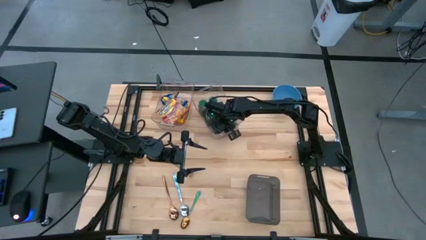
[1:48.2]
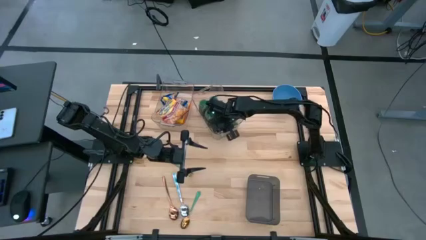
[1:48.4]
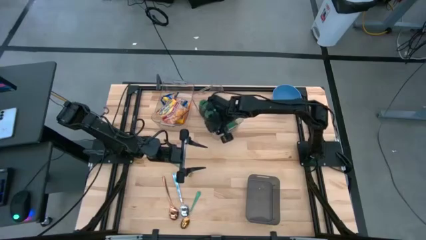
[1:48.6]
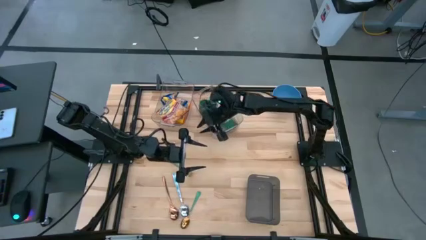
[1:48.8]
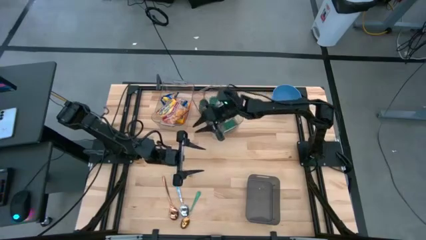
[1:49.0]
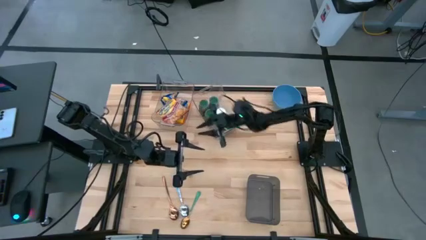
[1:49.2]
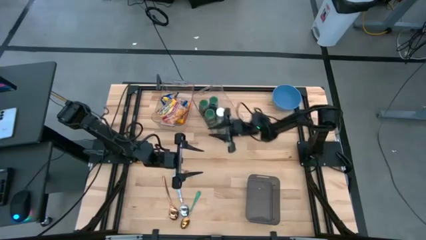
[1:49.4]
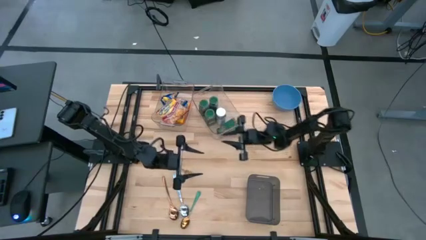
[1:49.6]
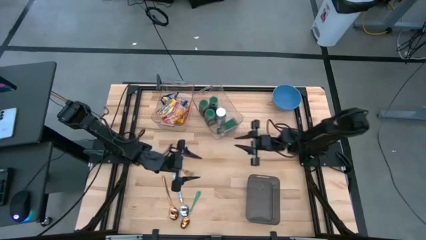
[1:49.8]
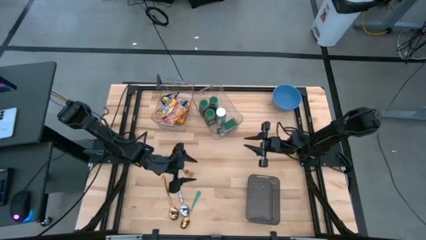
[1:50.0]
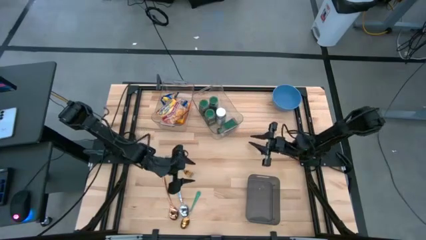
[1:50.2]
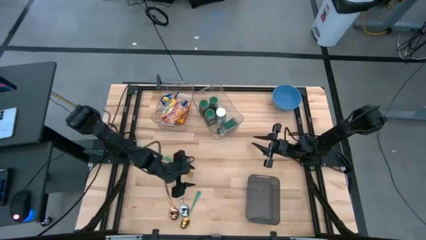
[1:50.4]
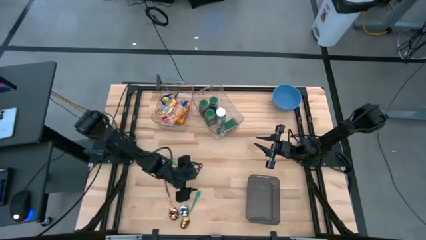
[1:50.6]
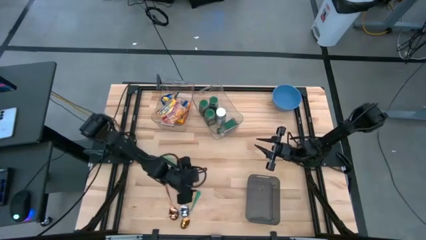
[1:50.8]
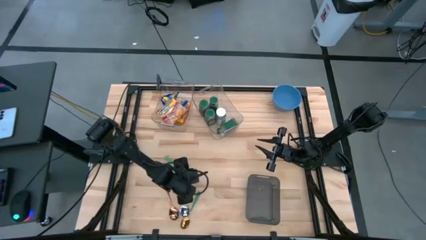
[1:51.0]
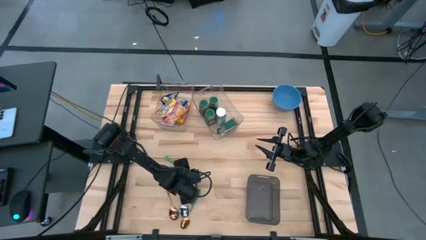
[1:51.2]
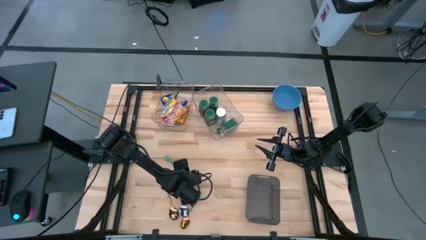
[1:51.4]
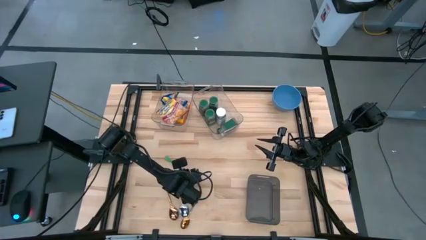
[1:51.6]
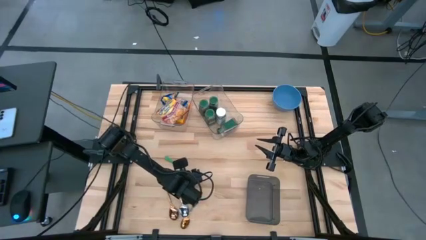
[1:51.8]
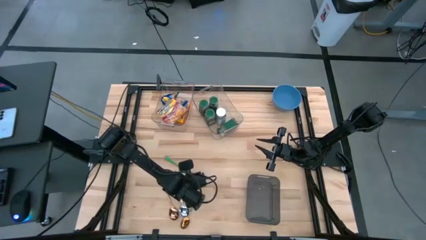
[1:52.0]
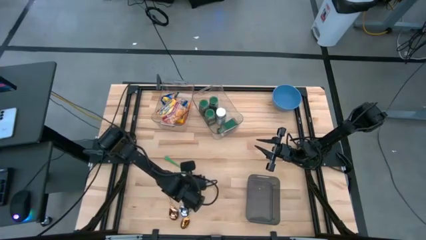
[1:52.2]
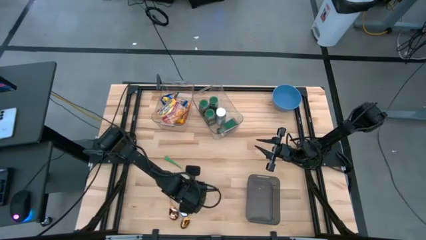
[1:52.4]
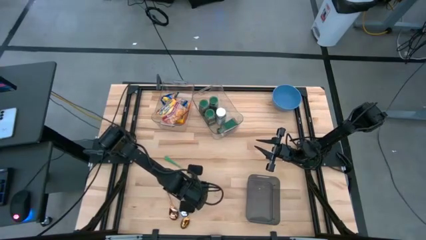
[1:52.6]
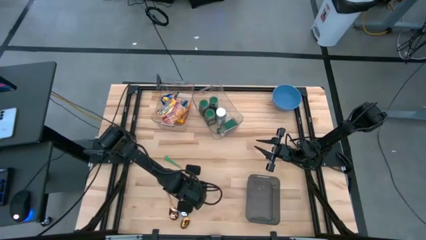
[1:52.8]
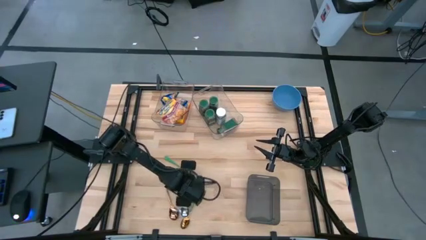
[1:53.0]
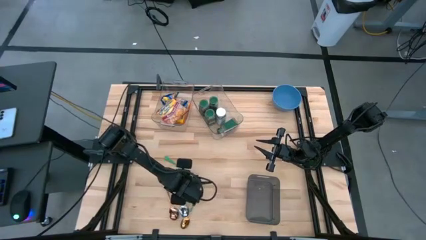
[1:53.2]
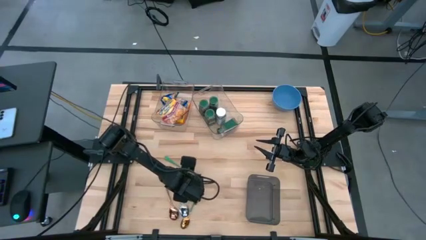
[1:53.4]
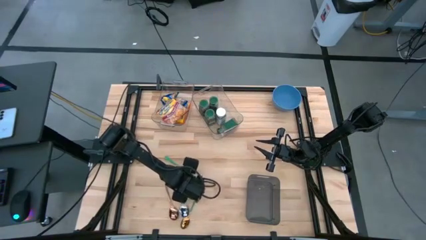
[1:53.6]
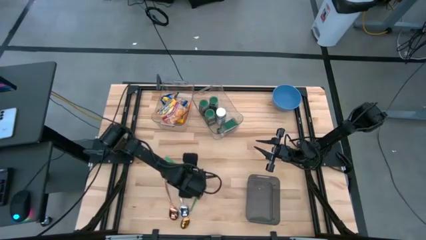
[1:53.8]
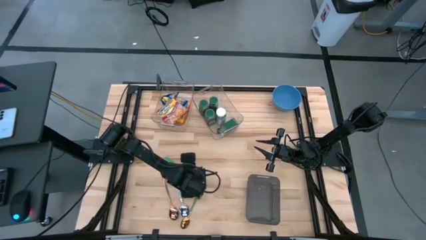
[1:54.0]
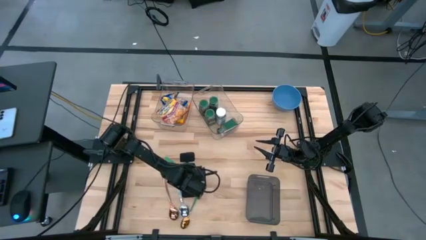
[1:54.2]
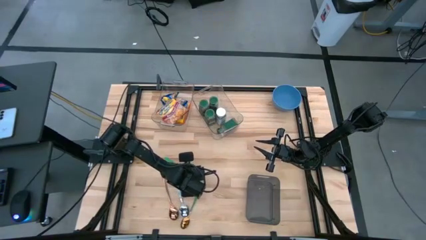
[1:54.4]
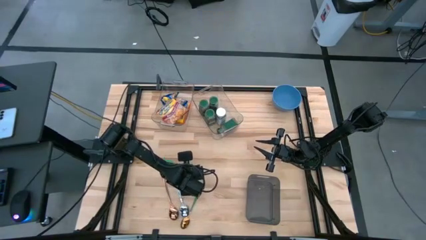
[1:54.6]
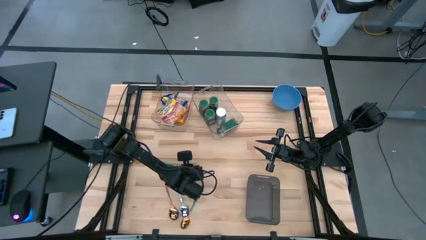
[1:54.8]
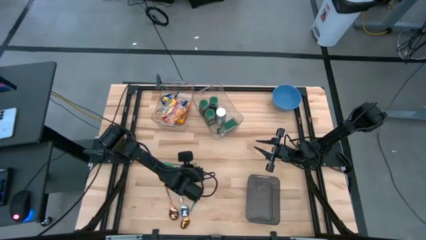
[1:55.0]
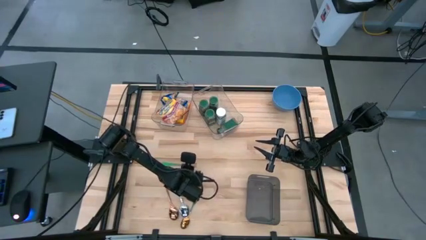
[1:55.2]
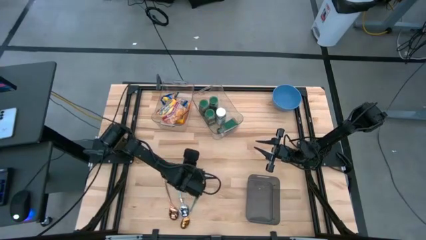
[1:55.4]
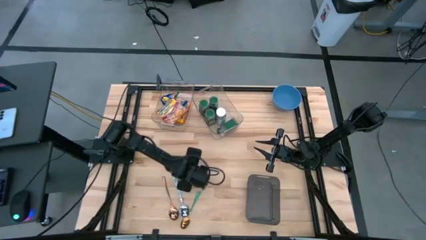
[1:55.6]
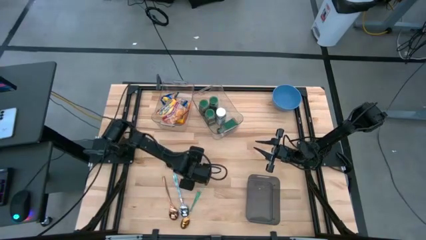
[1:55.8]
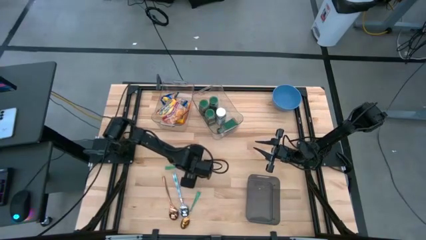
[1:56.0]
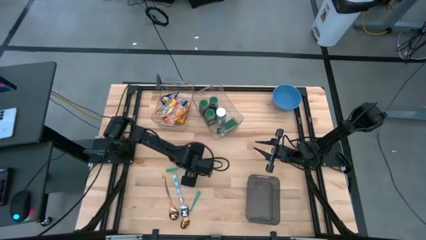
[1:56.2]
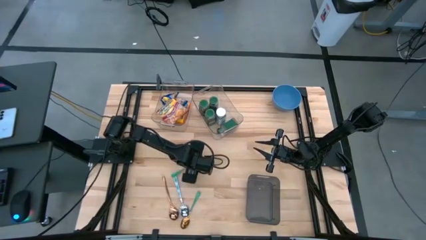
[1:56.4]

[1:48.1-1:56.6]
Put the green fork into the gray bin

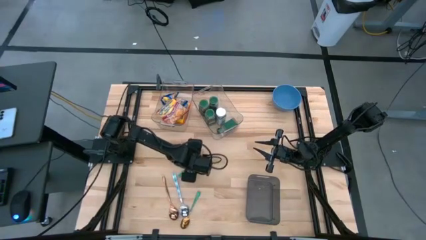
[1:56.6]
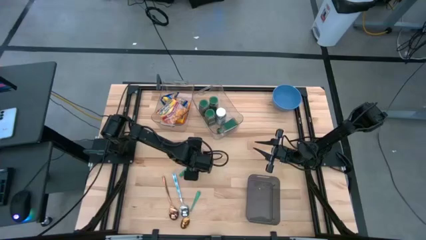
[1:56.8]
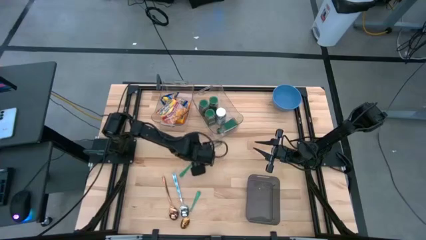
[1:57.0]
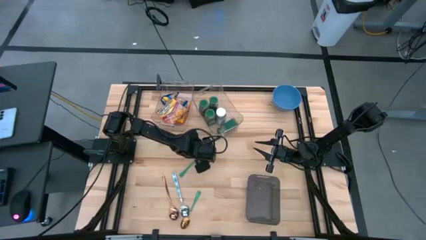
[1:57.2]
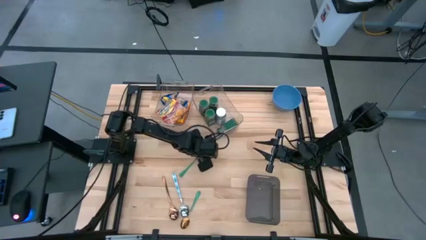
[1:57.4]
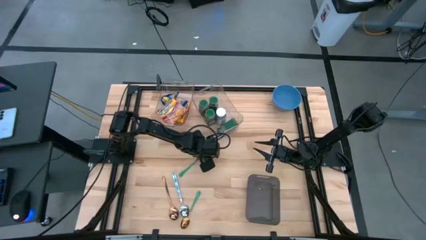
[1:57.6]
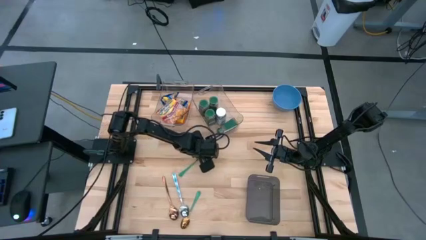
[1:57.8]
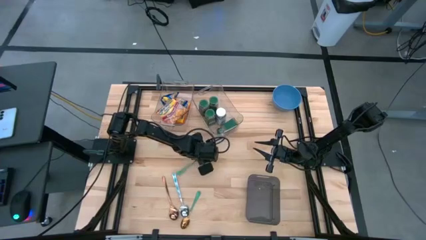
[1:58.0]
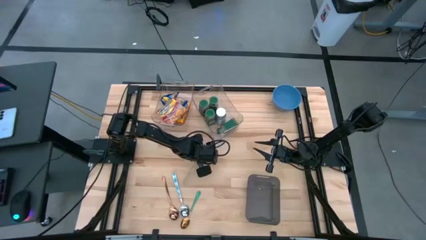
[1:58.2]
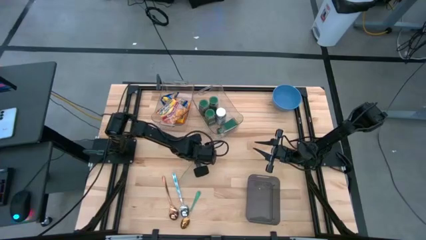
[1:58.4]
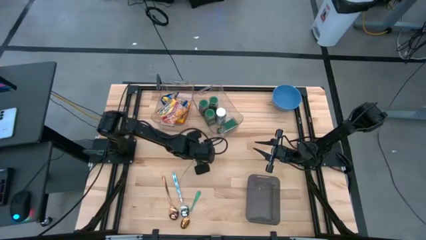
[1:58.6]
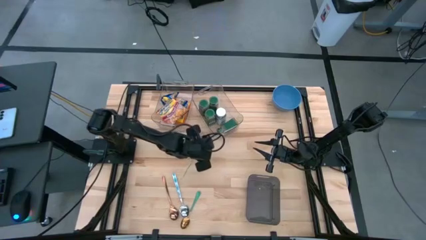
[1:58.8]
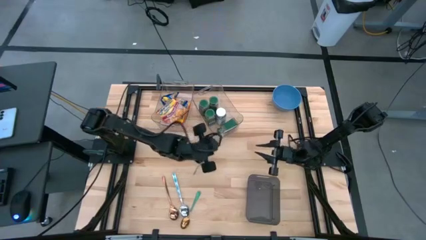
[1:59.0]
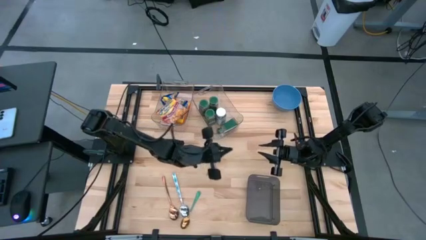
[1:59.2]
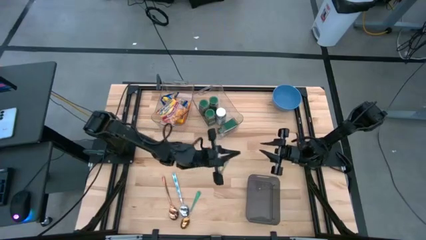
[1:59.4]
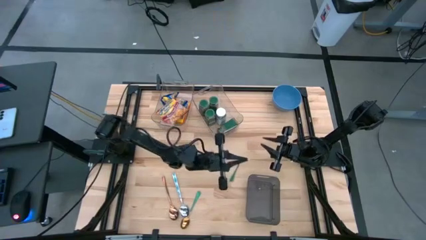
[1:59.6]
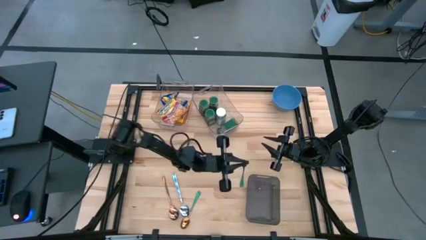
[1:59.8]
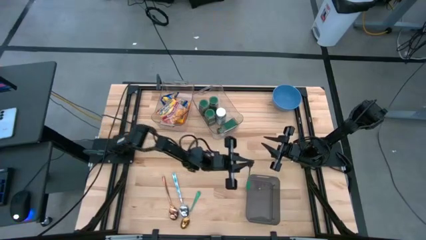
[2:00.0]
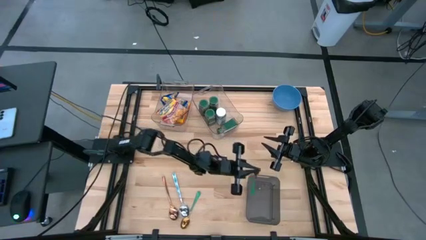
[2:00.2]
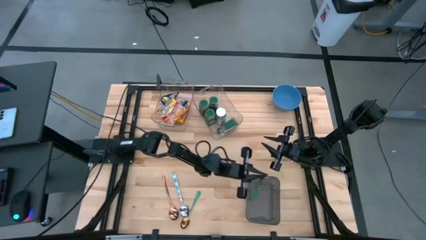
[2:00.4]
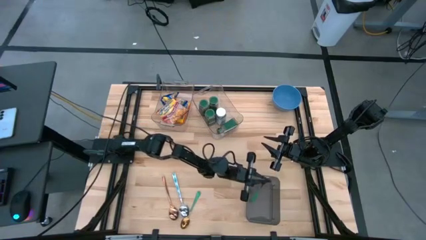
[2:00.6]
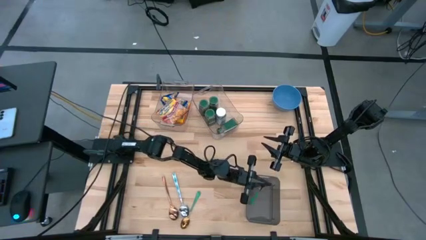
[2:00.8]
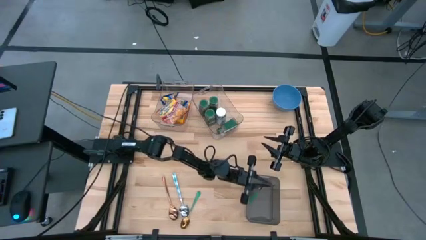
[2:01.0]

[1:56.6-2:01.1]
Put the green fork into the gray bin

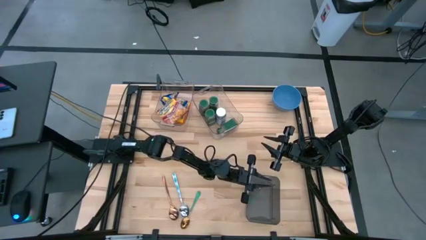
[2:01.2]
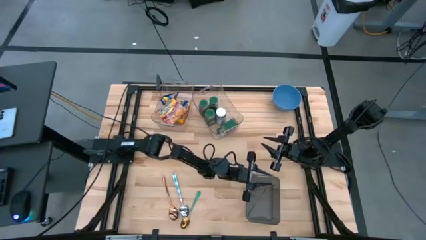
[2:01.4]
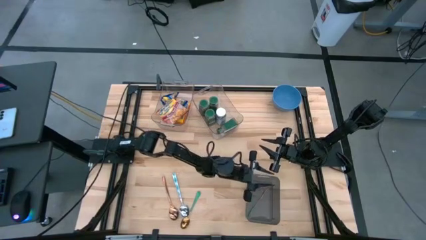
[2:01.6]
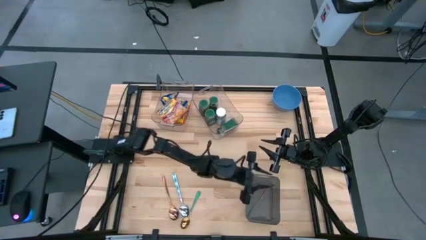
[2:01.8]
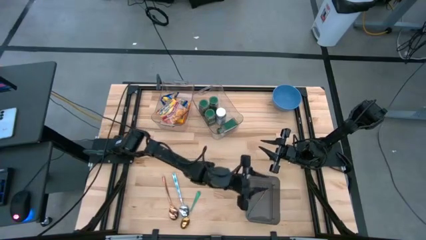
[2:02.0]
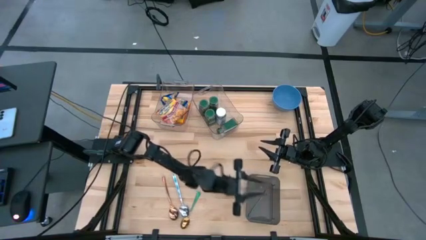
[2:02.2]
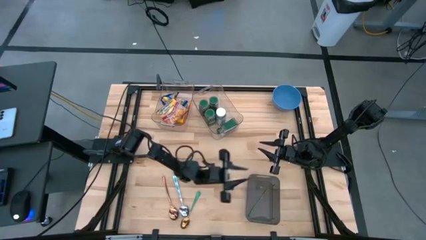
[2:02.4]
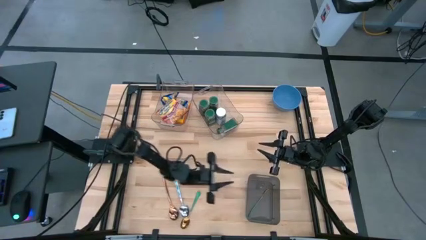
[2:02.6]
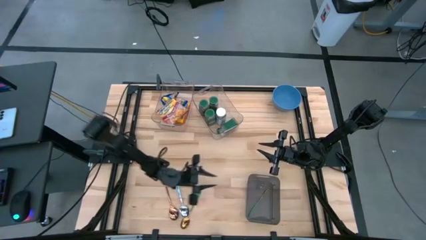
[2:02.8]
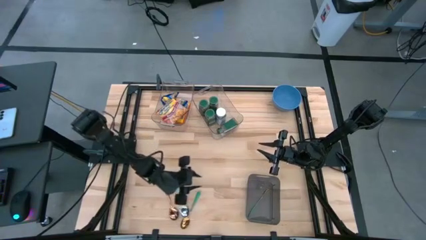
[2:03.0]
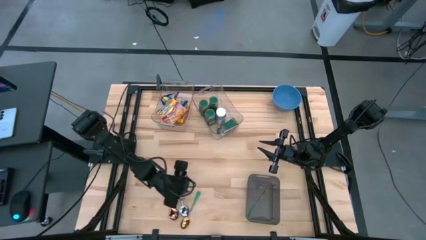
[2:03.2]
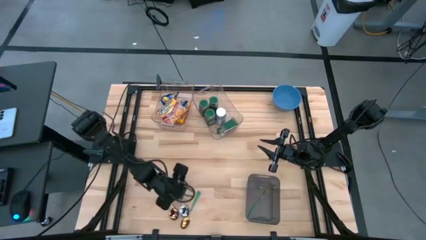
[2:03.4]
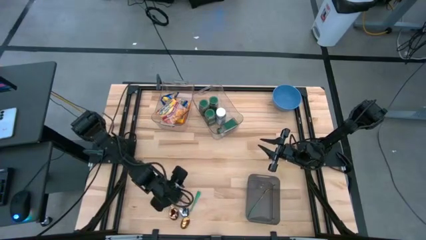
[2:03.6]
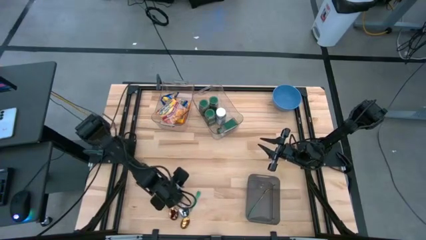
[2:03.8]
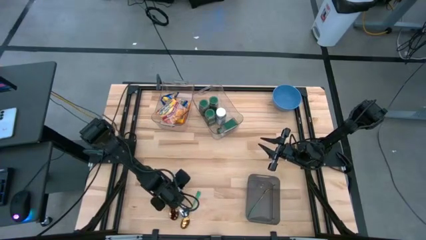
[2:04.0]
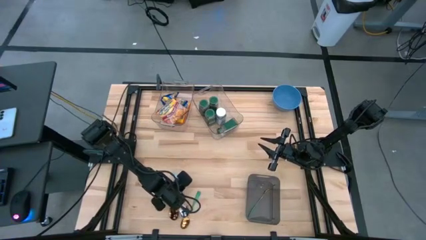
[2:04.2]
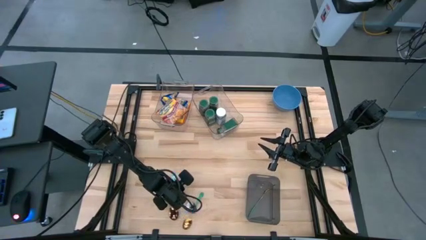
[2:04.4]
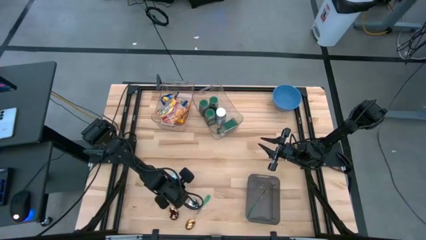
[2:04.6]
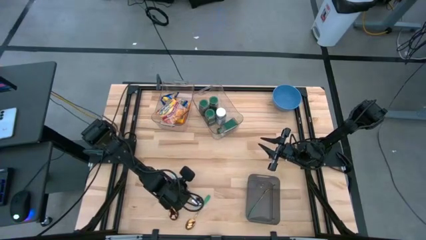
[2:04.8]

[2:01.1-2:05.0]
Put the white spoon into the gray bin
